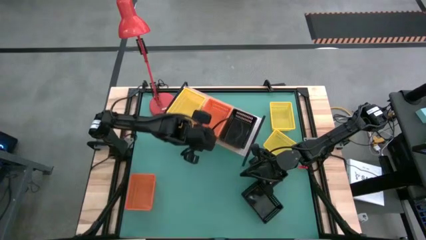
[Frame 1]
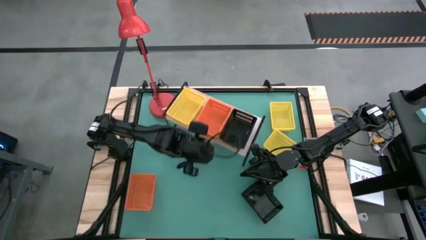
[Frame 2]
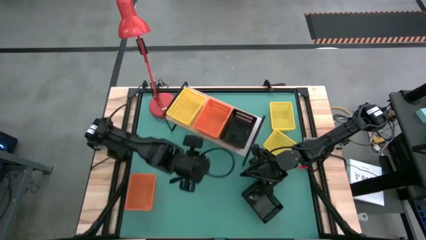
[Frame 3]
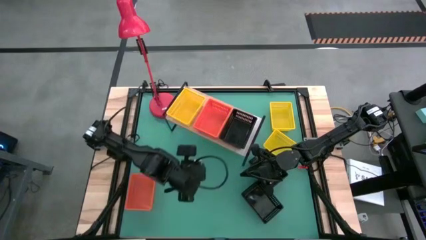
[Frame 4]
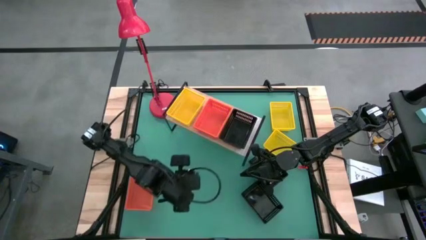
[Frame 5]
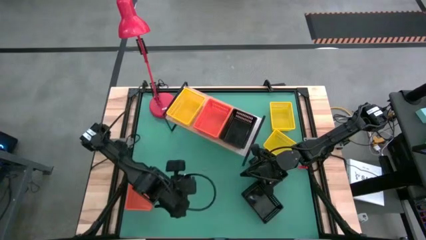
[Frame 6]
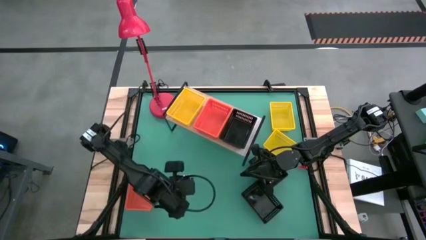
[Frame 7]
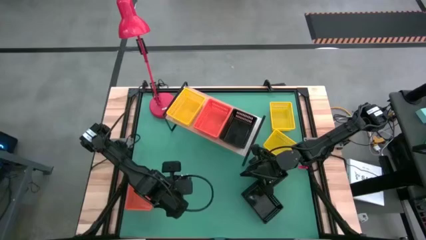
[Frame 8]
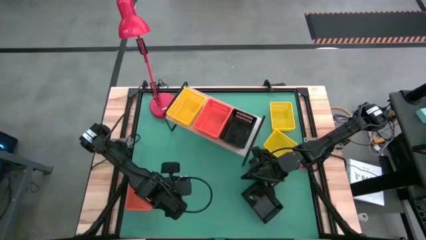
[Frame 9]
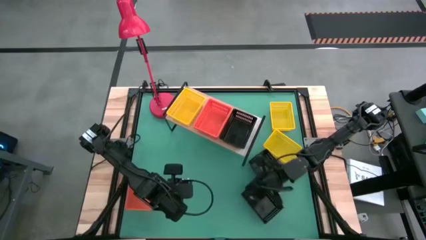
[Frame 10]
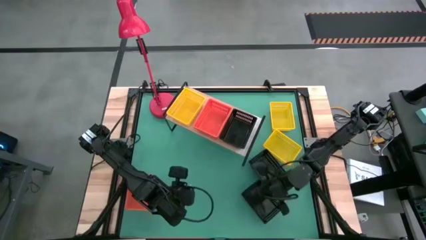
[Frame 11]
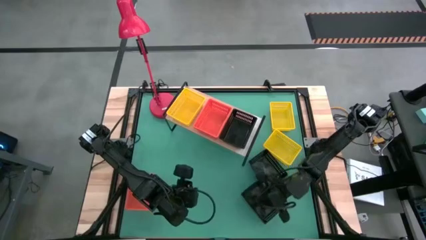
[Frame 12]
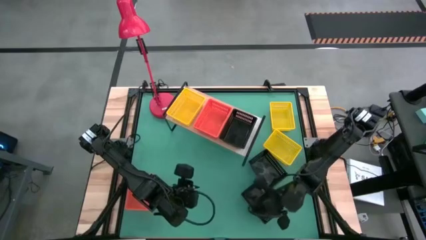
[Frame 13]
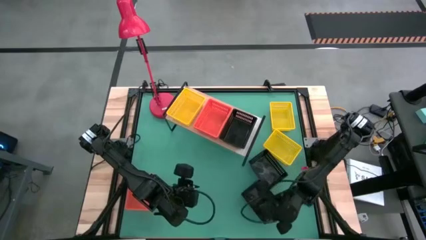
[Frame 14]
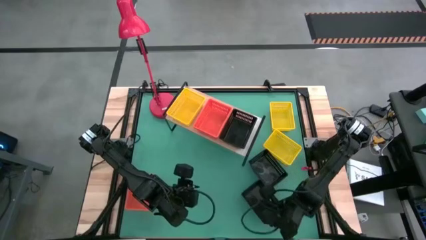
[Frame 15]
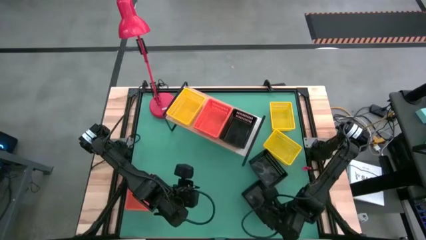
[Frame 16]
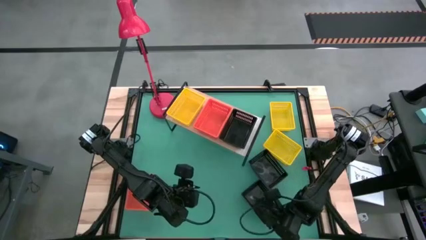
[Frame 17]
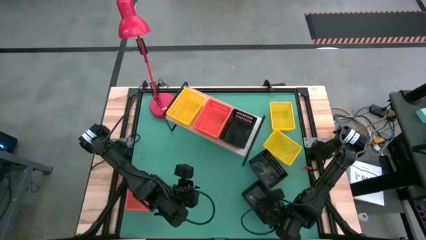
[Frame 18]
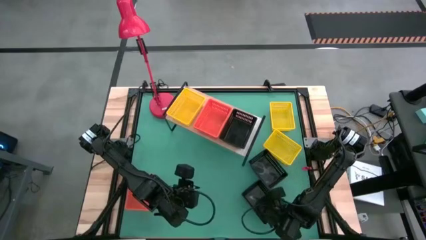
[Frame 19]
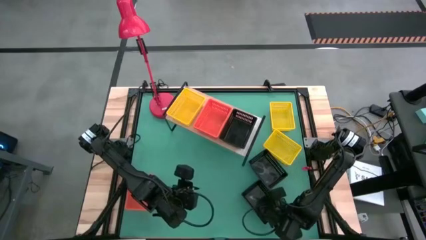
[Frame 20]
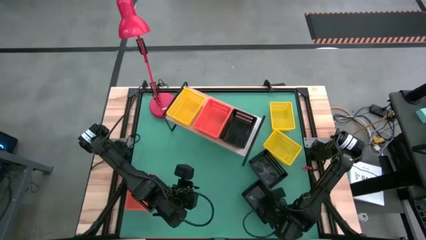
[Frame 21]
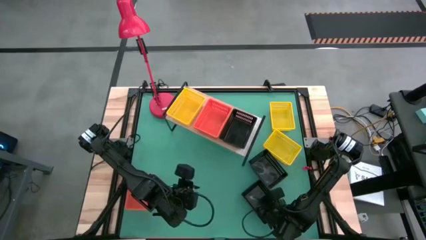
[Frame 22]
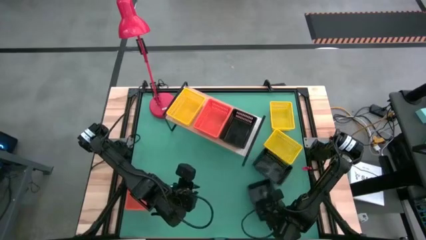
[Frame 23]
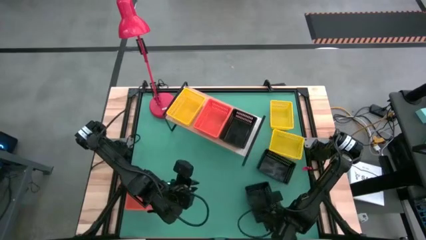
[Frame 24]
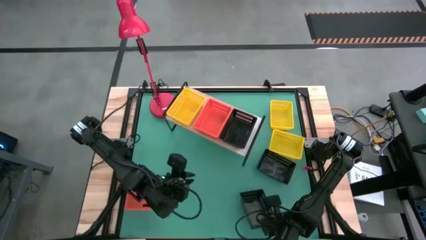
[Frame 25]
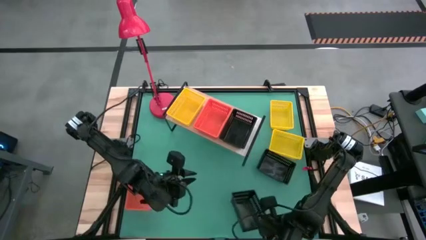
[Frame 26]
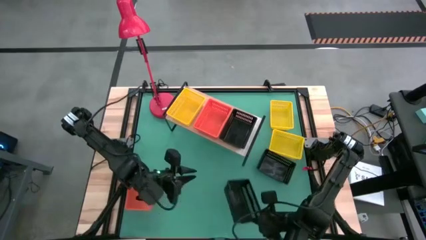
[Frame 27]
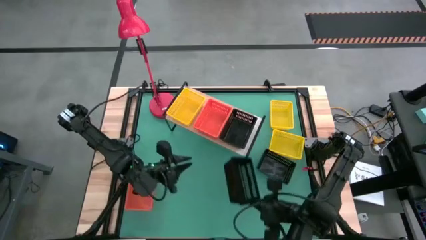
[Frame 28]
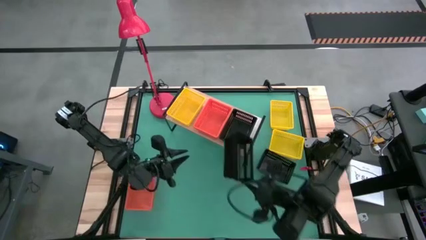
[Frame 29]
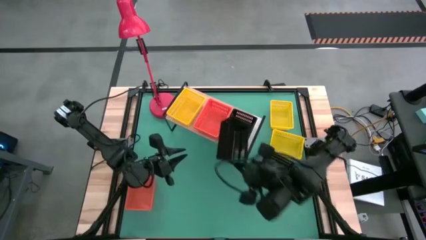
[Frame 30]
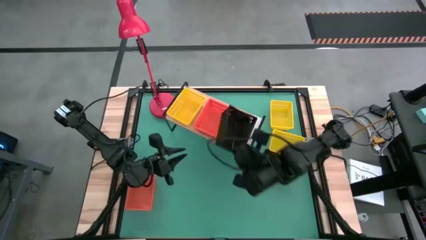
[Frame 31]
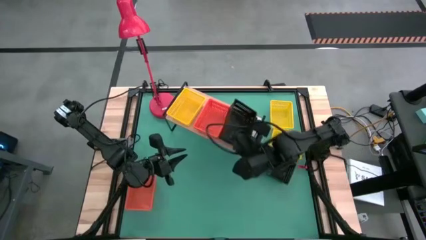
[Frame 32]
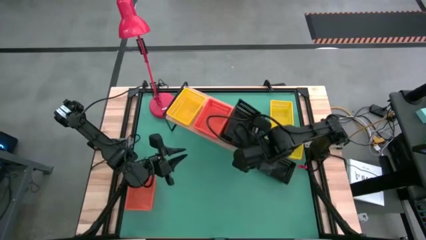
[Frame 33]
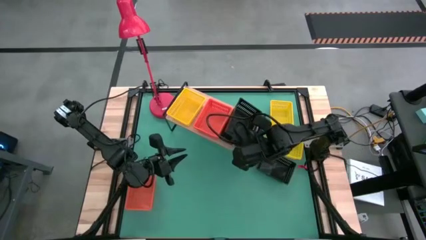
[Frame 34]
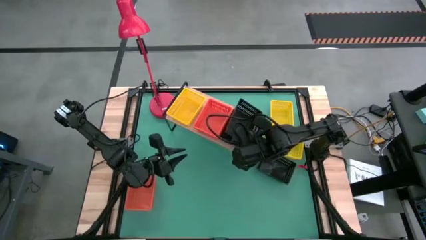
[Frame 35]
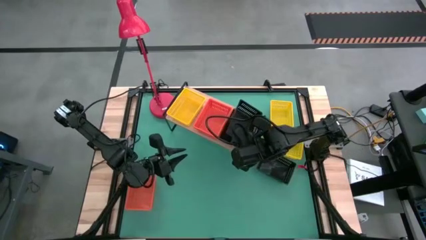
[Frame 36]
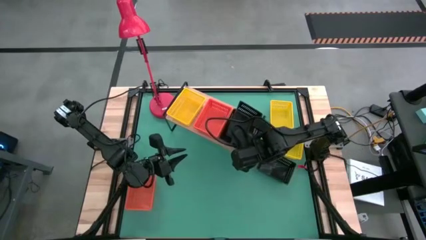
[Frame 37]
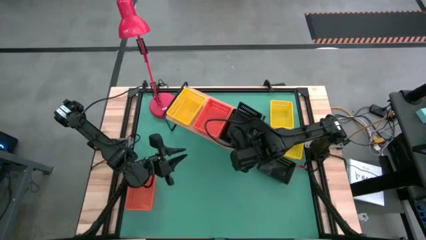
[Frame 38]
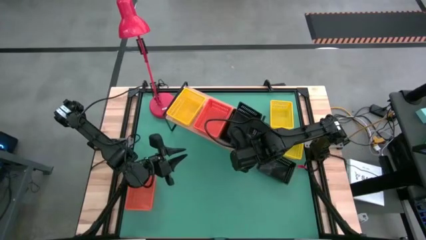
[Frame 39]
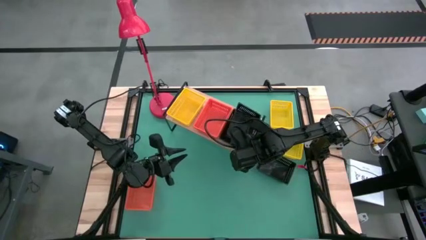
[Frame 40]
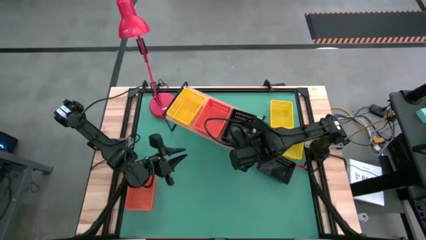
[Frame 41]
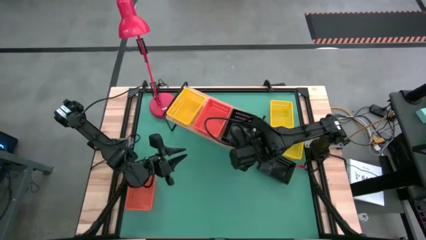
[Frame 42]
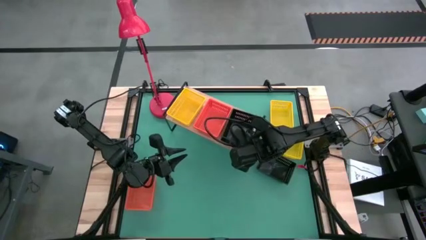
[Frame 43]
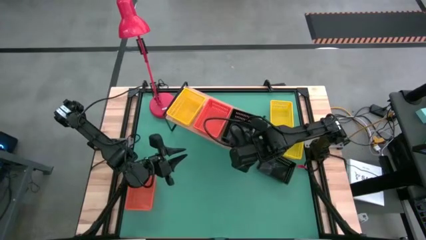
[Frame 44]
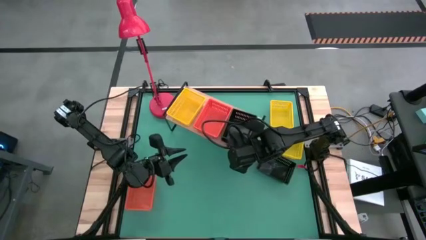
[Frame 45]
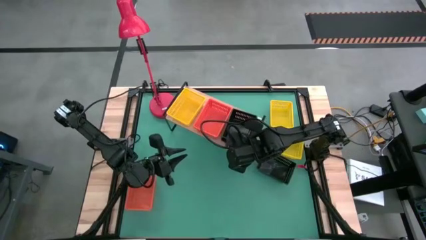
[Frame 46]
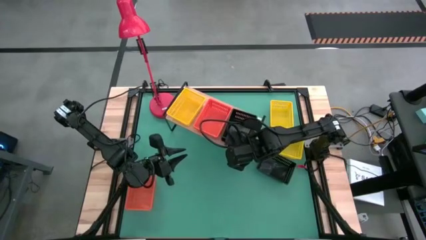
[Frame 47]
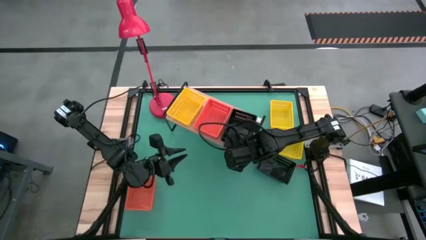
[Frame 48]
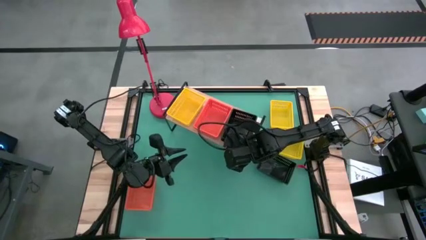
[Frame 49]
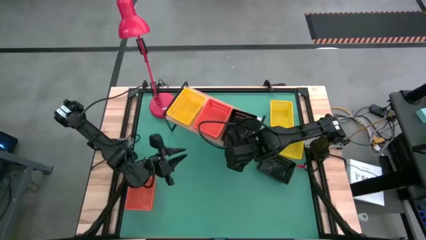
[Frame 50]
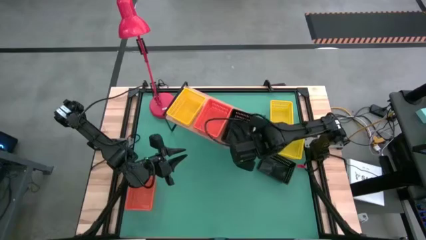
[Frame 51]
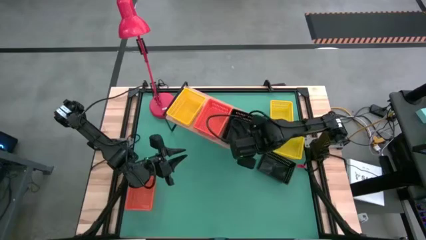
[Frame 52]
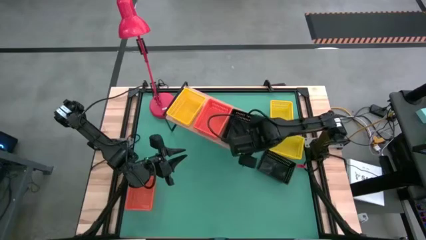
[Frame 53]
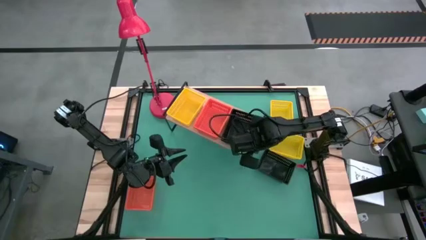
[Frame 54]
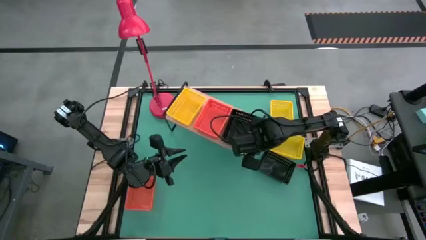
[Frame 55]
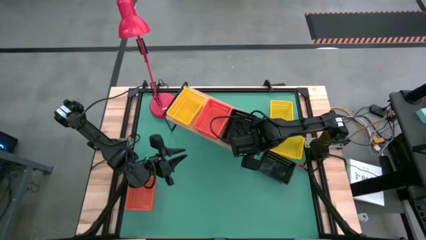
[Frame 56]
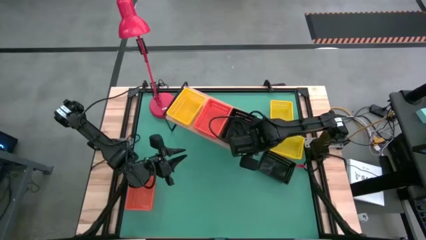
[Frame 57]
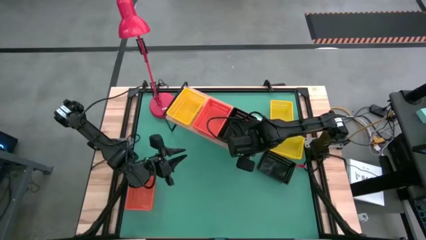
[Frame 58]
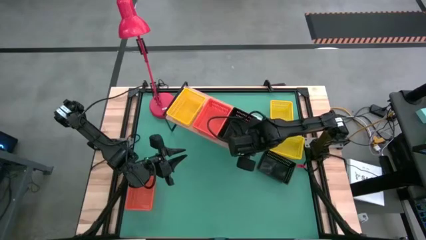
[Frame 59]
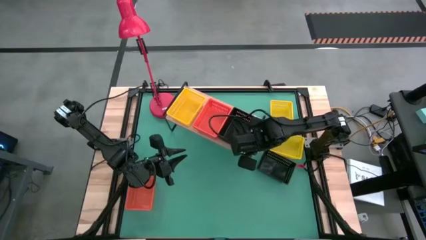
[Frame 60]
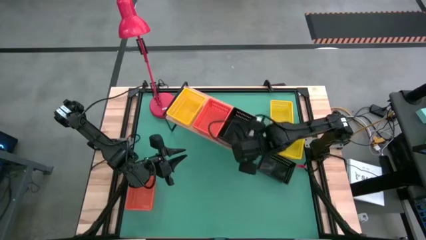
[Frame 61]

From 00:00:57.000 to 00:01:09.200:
Task: Stack baskets on shelf by color
Stack the bottom black bin on top of the other black bin on the shelf

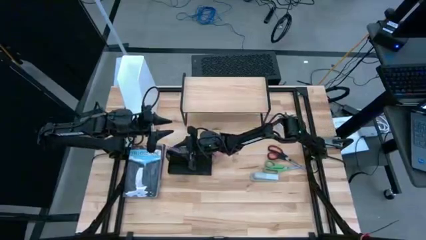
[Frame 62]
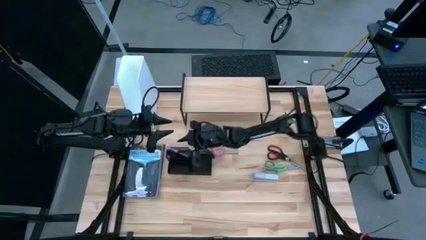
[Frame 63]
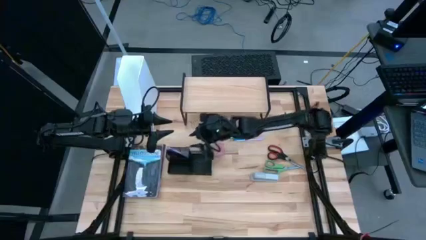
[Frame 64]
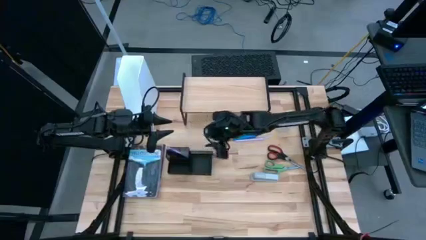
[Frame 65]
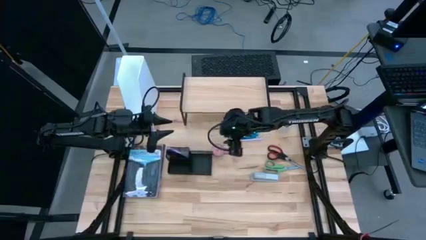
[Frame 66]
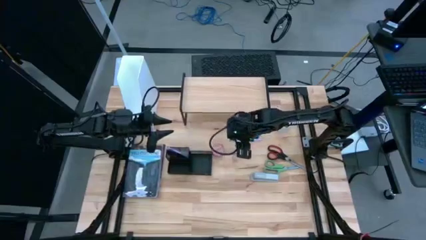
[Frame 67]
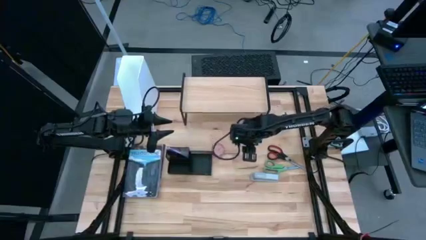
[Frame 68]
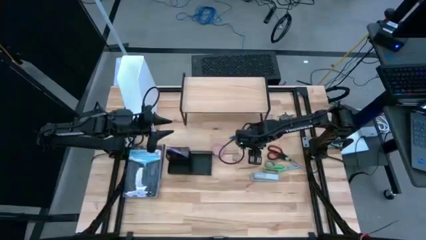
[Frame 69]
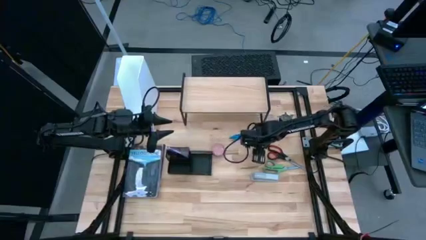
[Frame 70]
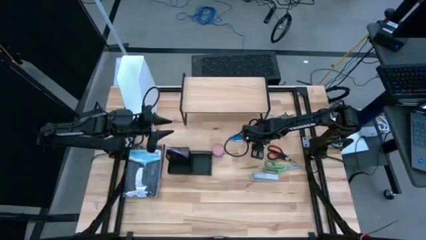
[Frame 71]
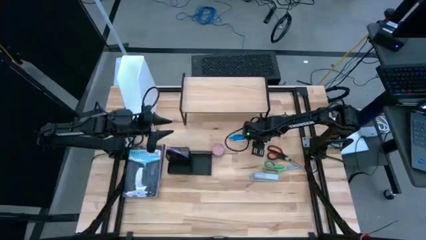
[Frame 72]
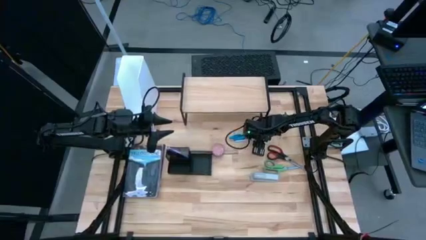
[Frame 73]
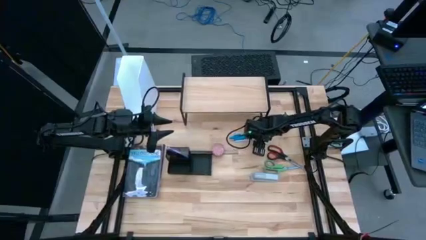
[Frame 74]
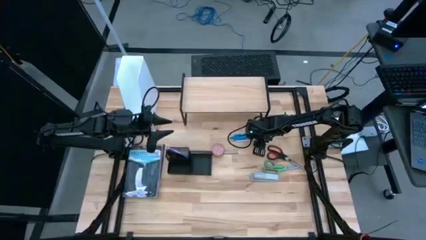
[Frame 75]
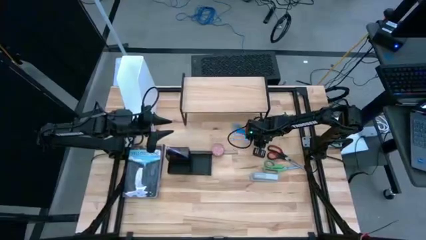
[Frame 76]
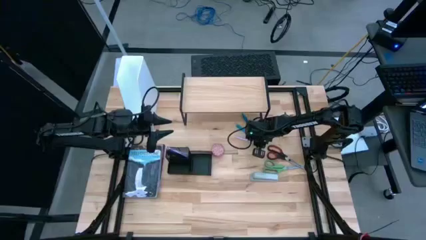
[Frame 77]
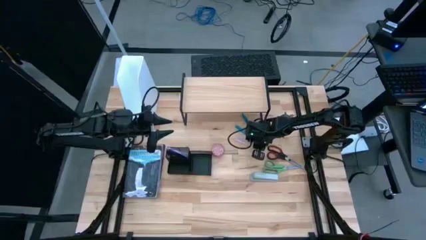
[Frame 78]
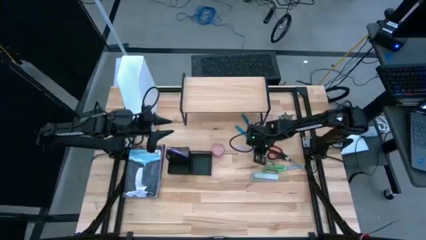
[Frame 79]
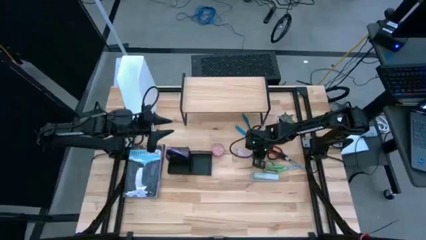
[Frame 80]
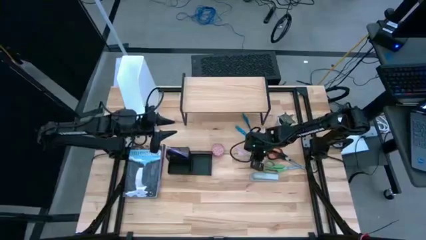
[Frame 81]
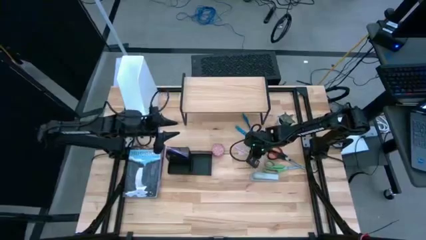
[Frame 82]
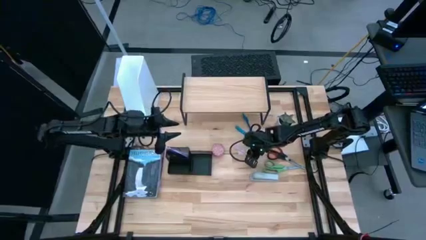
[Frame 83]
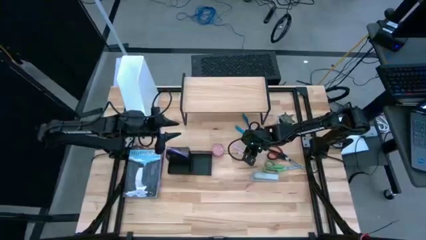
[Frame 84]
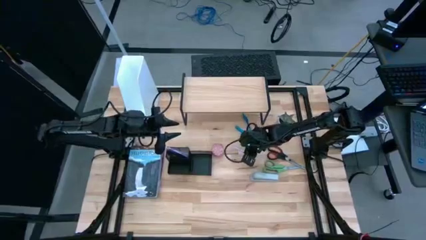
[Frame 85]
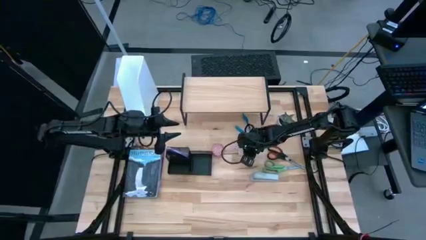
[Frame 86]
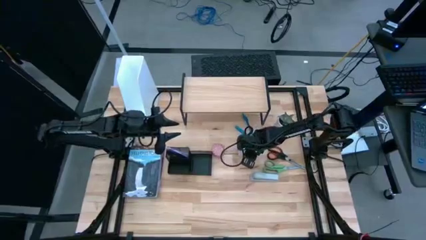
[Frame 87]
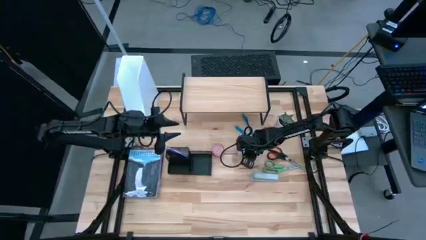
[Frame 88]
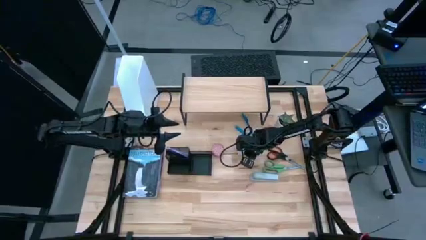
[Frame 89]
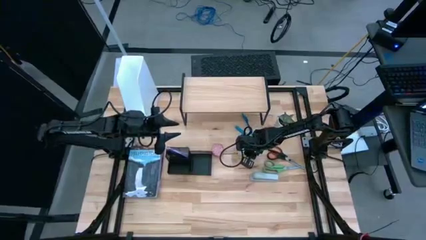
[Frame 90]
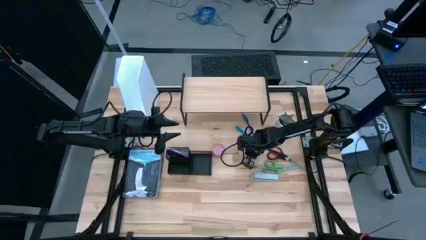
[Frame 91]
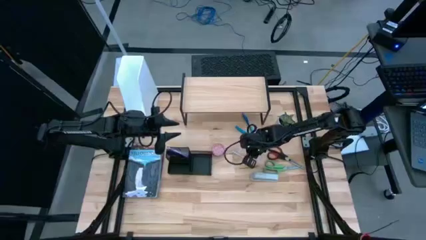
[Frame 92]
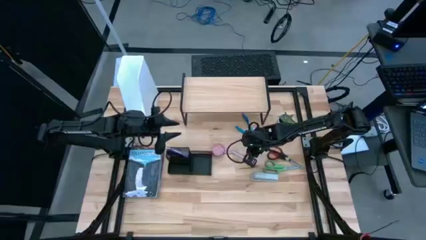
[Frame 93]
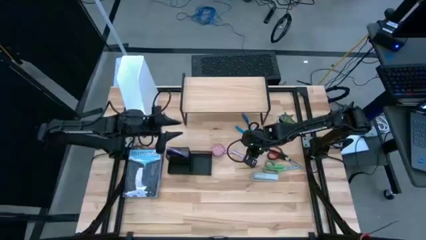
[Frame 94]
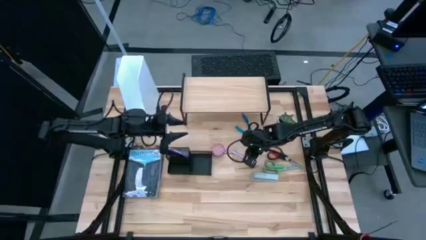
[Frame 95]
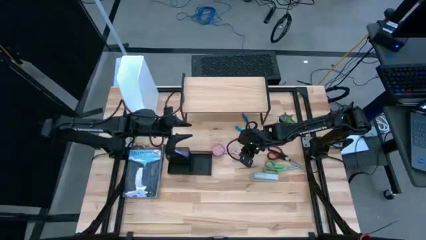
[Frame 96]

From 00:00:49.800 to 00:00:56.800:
Task: Stock shelves
Put the purple pen into the desk organizer
